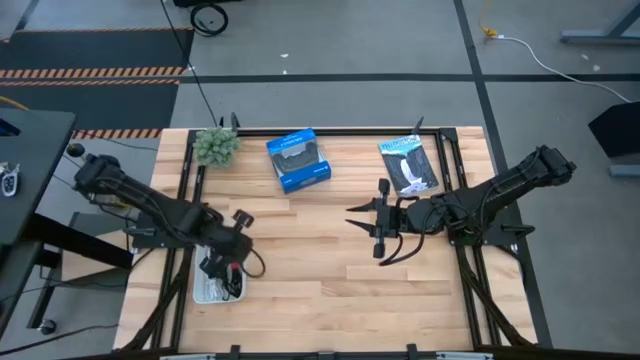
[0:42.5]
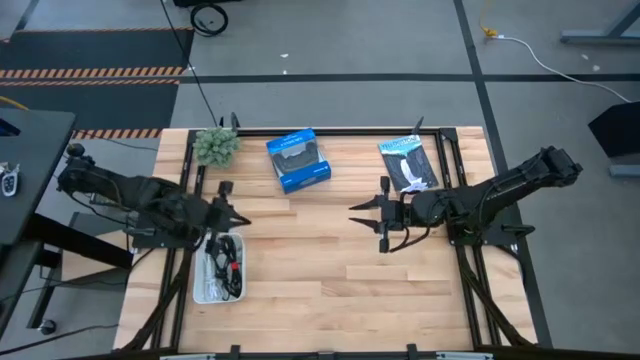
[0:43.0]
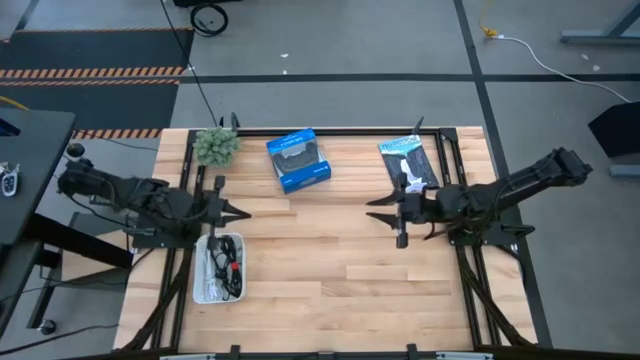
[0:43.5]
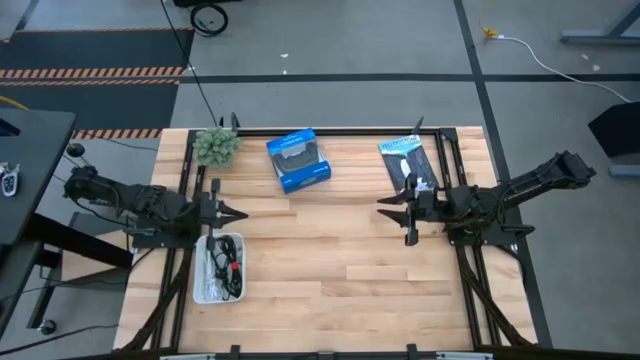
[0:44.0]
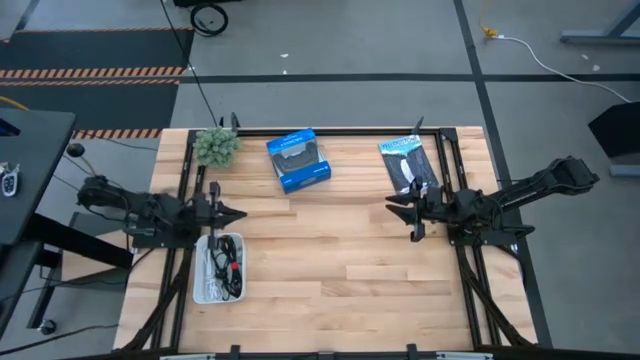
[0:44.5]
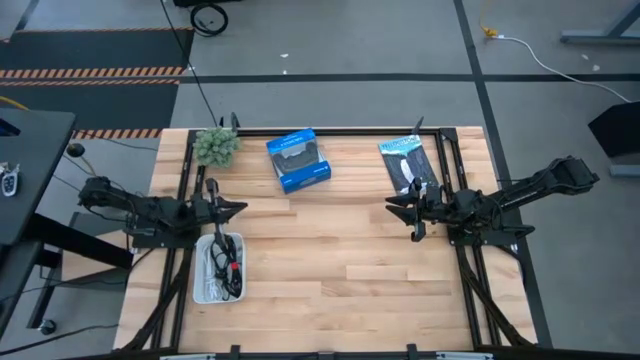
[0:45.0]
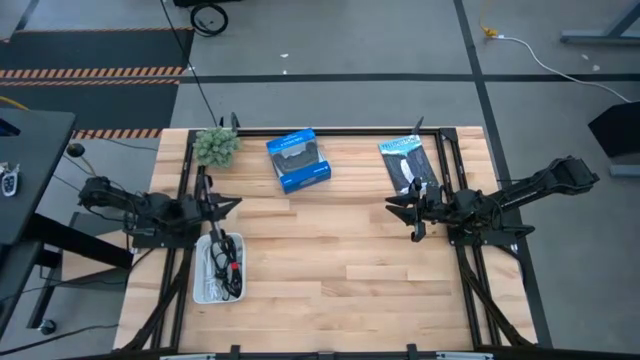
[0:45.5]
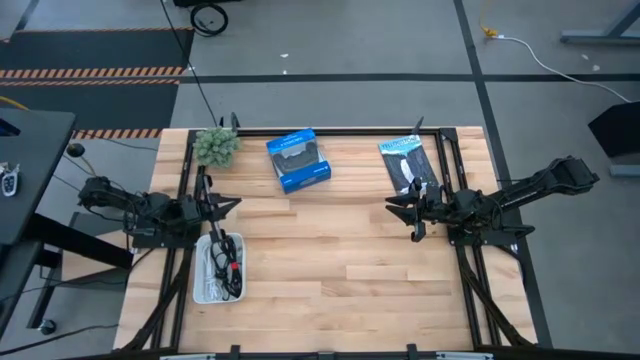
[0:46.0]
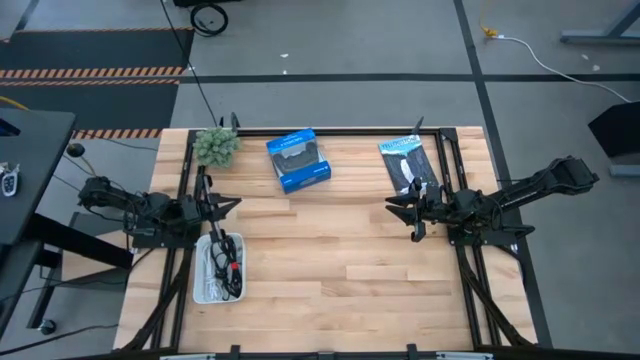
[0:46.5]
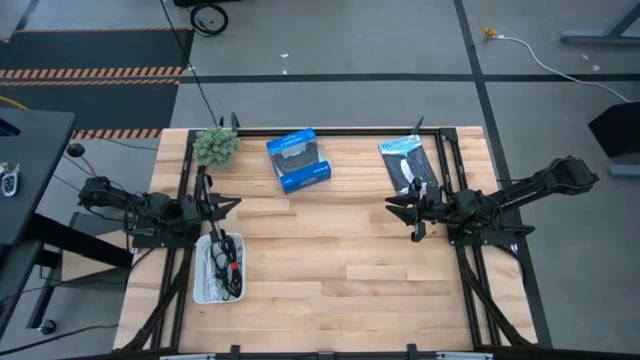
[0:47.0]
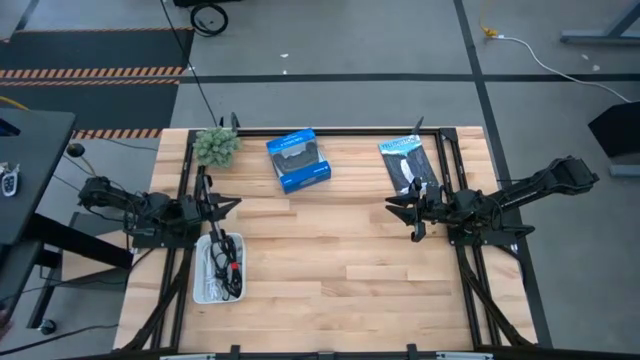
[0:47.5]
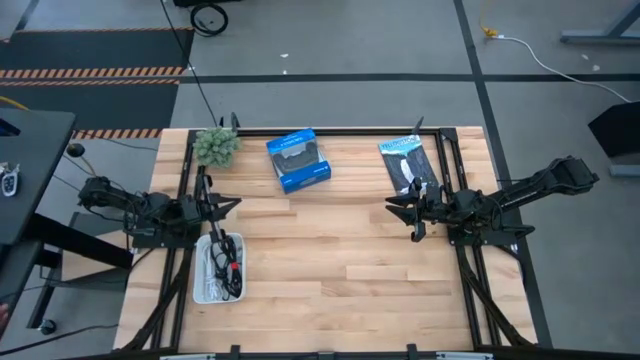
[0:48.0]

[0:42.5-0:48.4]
Task: Pick and place USB-C Cables
Return to Home Position

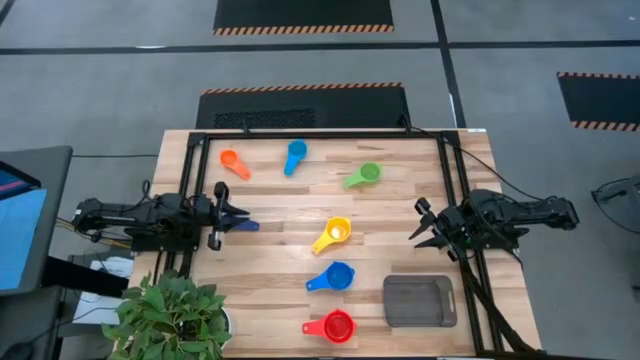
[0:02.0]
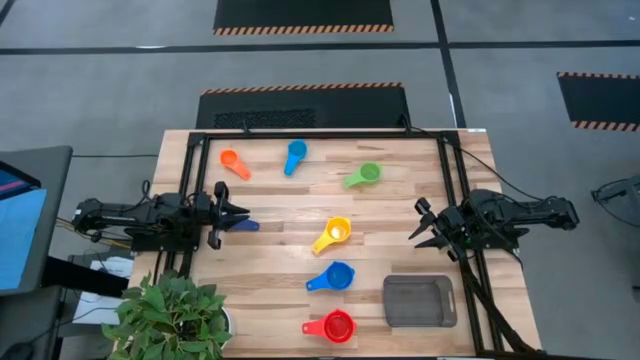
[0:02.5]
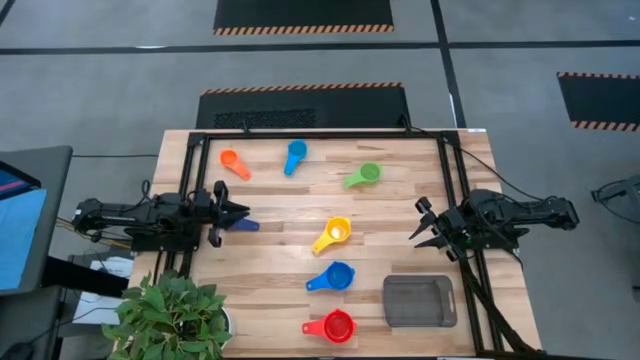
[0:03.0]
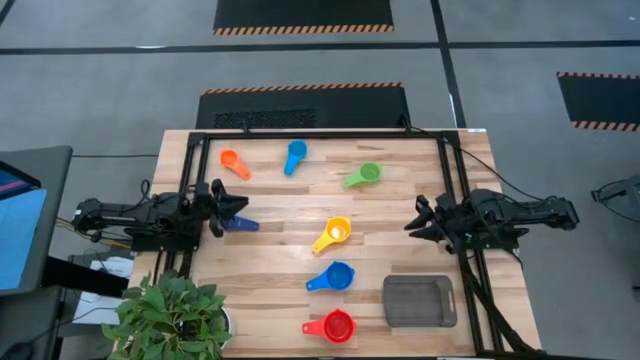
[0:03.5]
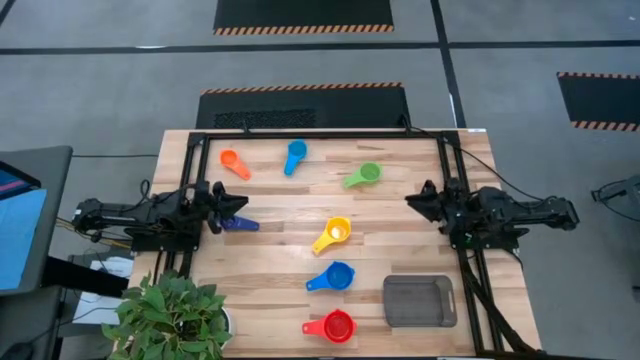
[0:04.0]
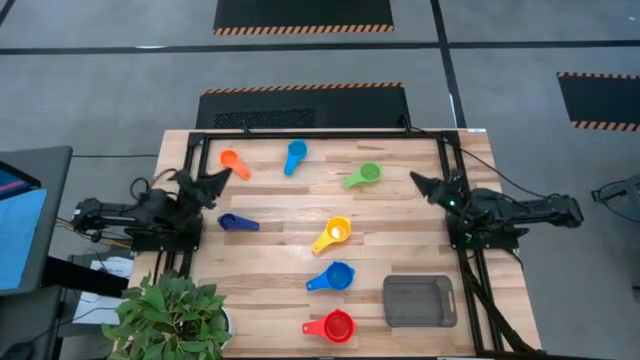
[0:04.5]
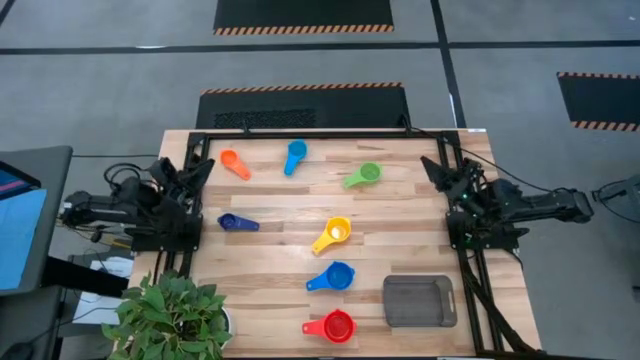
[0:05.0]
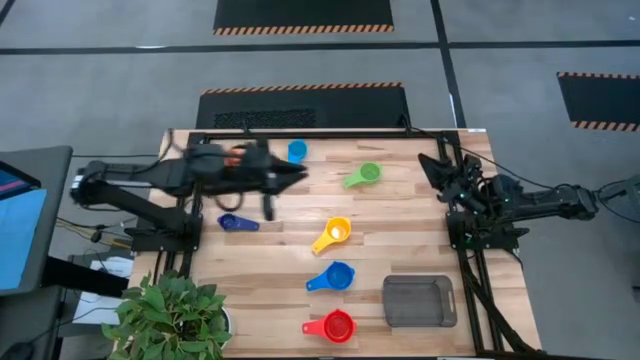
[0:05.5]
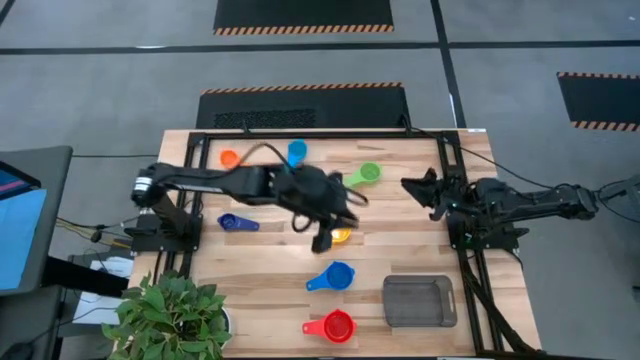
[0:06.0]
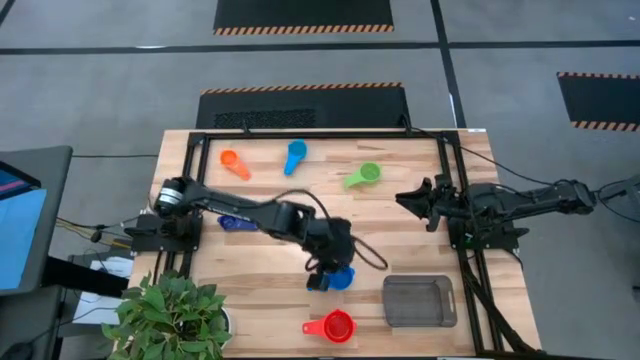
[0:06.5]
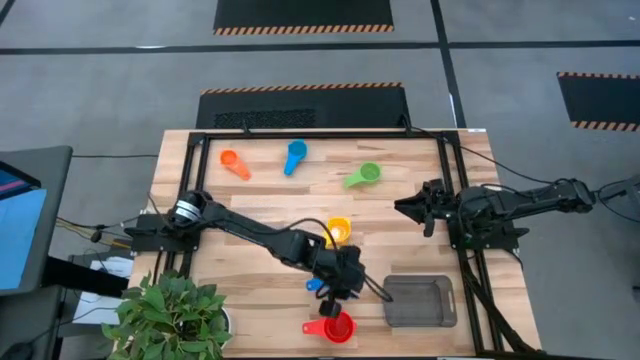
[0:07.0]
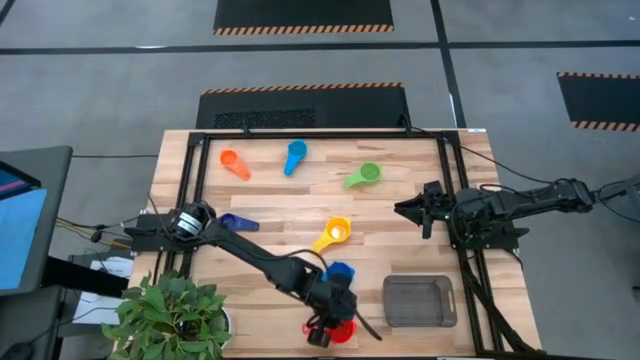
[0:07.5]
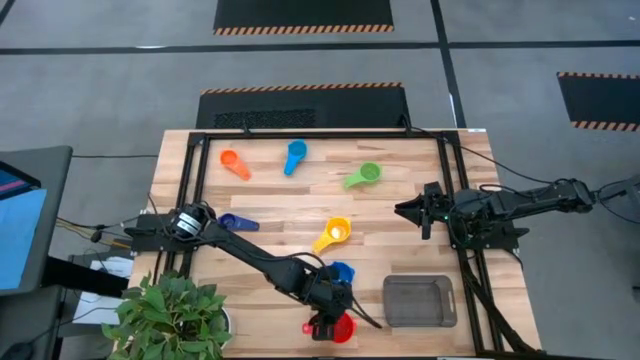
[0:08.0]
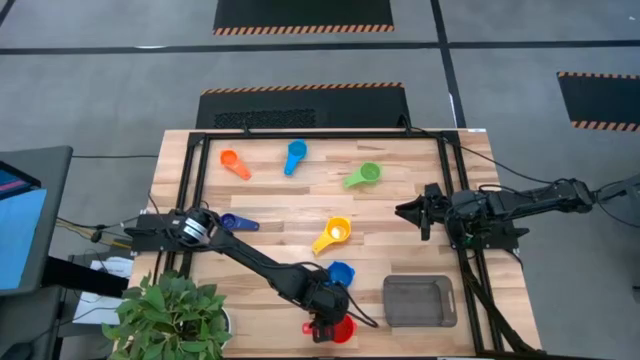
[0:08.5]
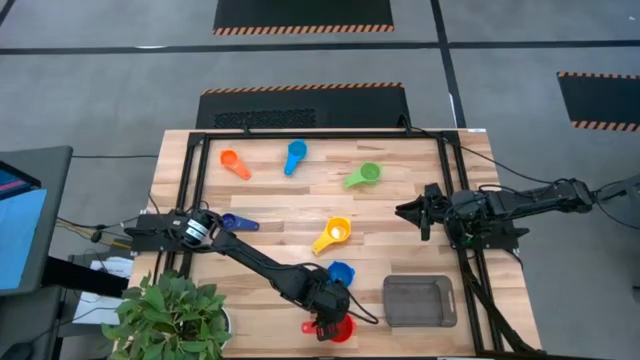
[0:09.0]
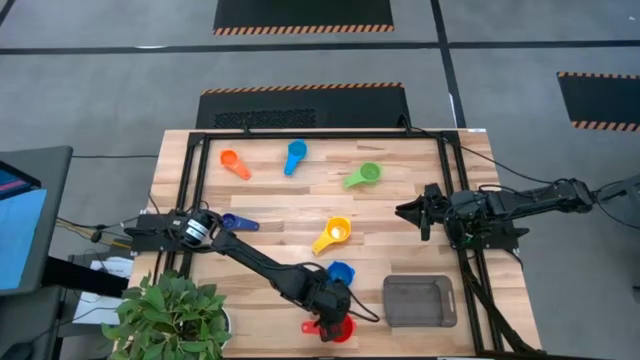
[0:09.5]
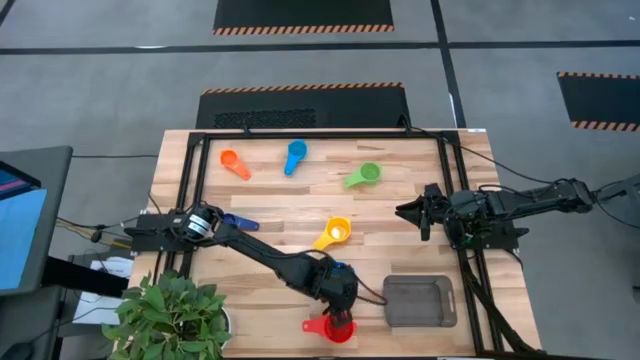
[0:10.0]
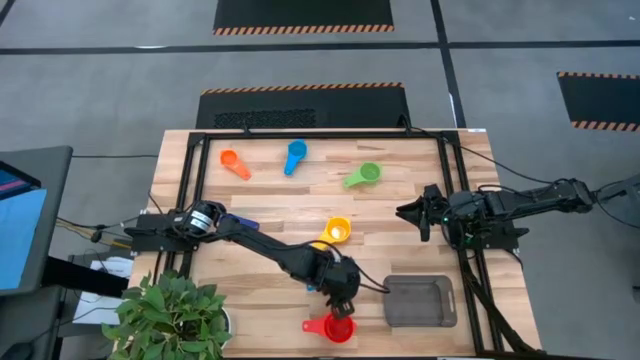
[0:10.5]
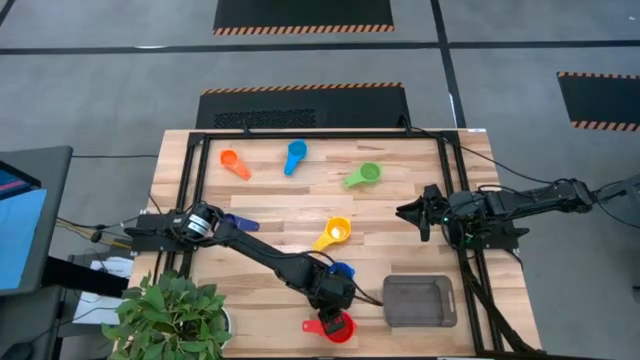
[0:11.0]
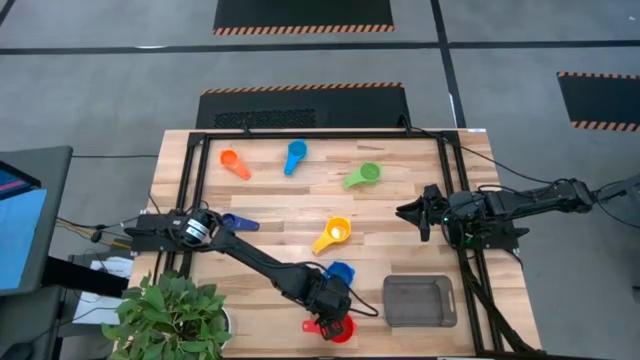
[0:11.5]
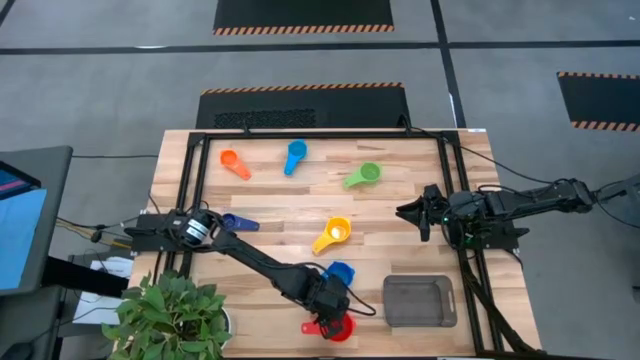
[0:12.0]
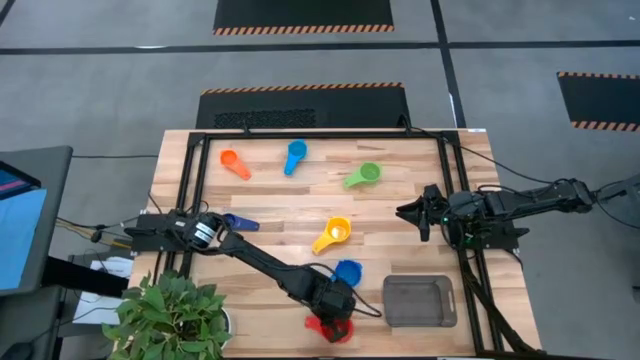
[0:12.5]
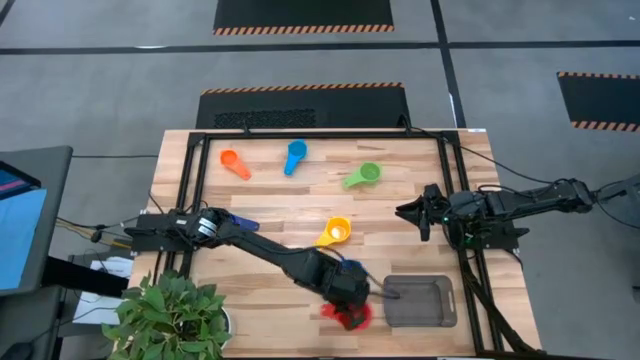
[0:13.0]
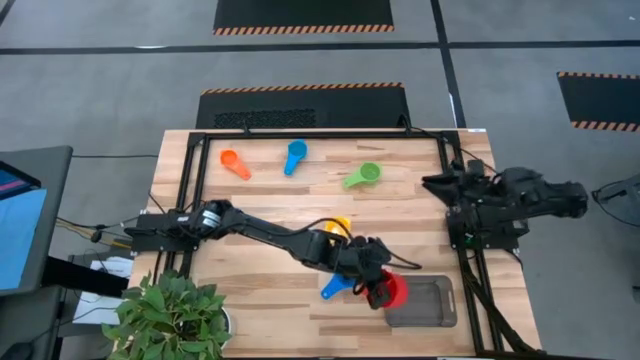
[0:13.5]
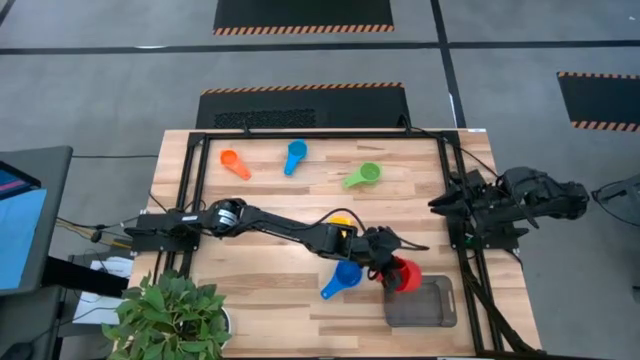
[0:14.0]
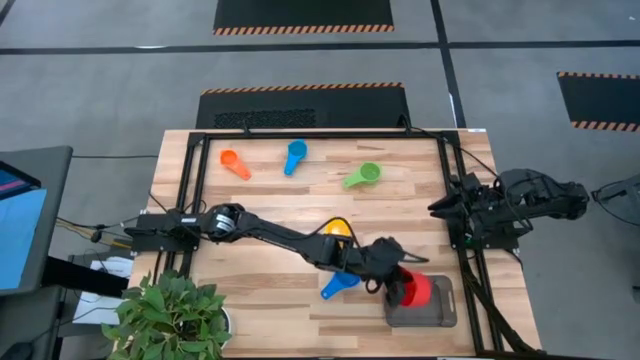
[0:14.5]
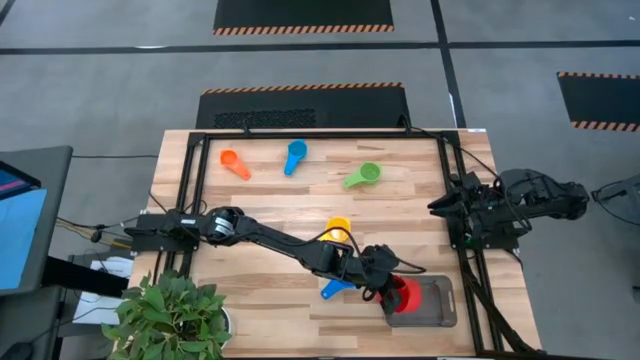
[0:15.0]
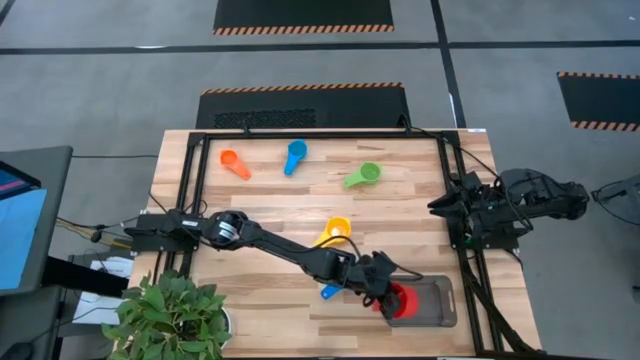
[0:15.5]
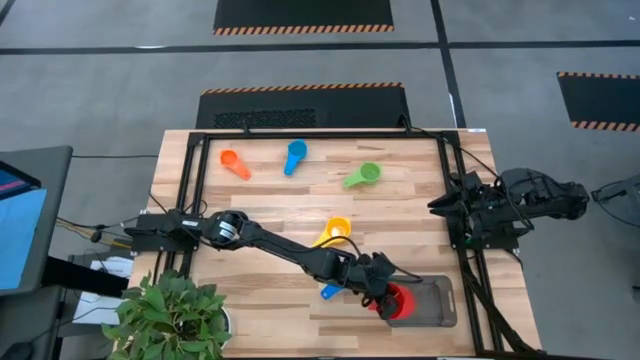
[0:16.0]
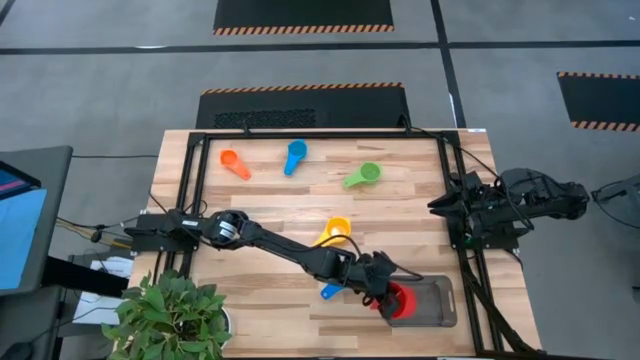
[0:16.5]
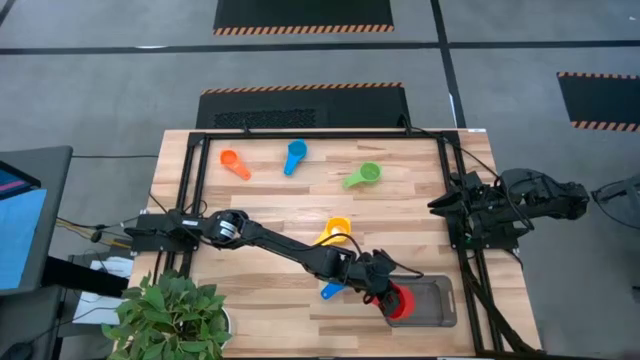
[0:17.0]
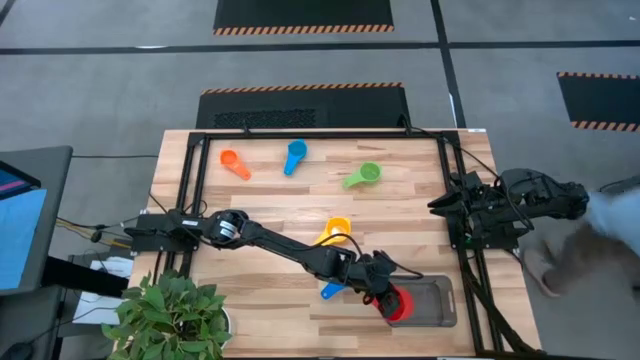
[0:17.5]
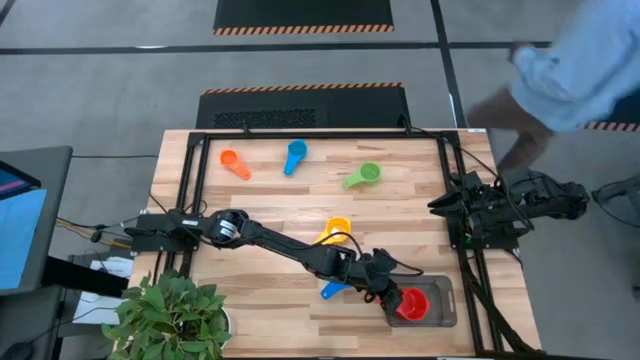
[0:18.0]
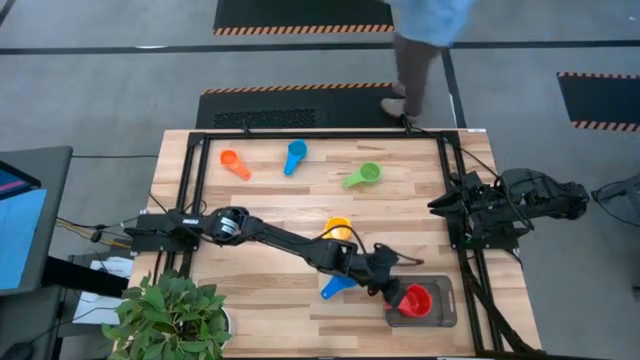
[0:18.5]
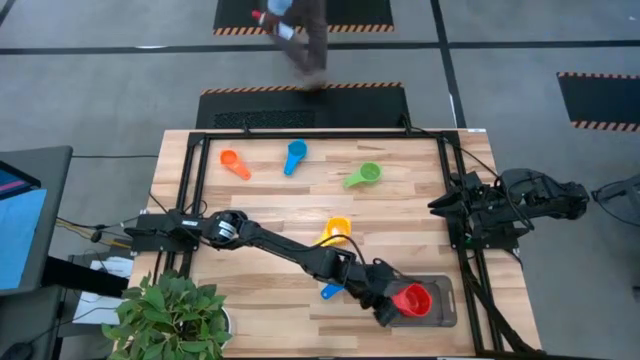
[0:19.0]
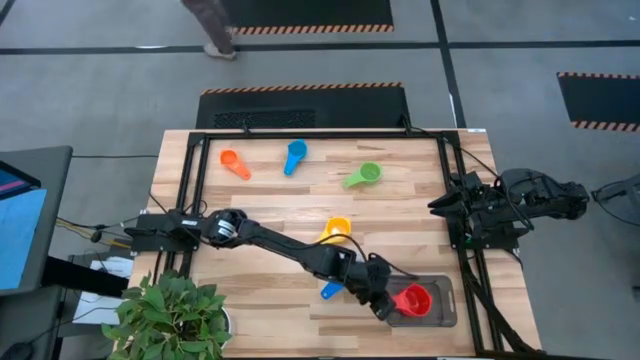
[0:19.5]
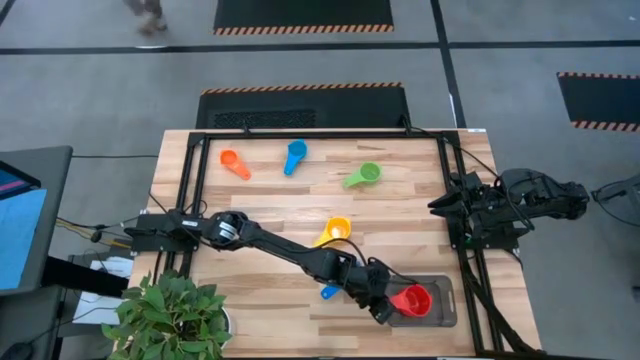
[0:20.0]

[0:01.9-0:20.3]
Task: Nest measuring cups in basket
Put the red measuring cup into the black bin
